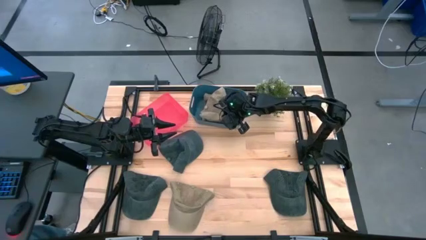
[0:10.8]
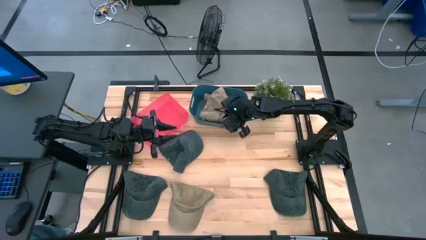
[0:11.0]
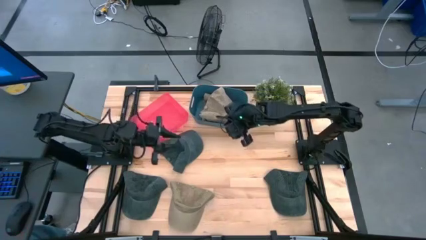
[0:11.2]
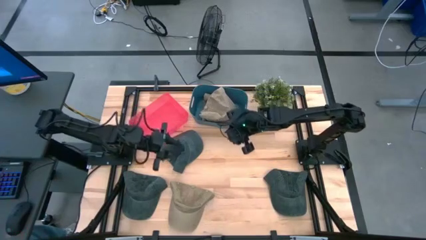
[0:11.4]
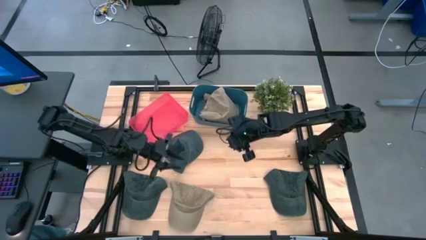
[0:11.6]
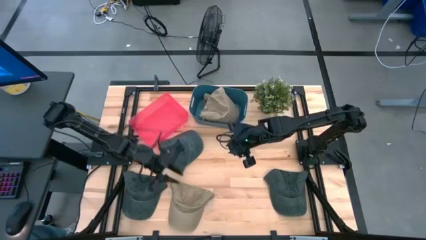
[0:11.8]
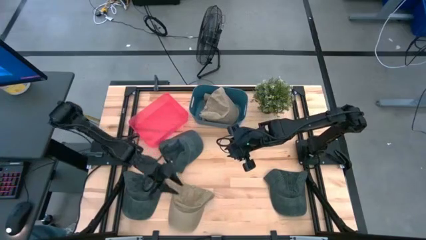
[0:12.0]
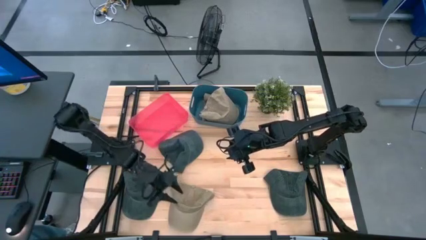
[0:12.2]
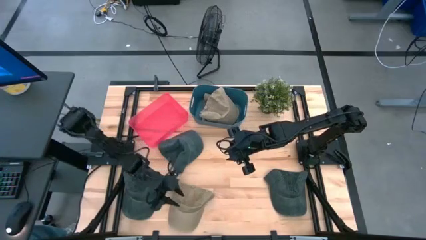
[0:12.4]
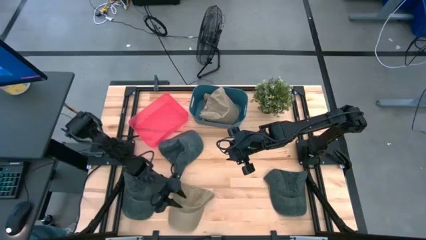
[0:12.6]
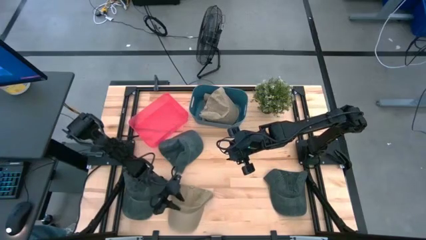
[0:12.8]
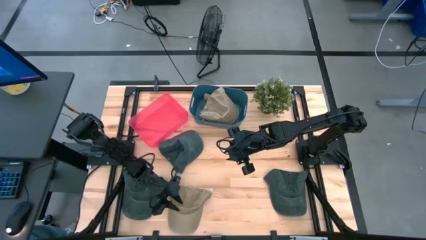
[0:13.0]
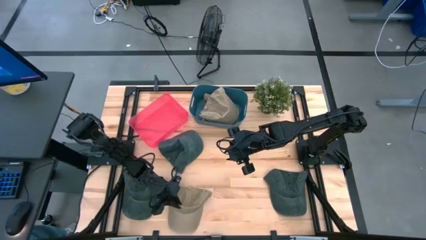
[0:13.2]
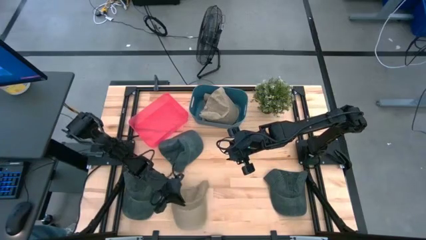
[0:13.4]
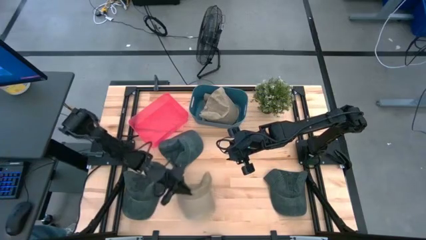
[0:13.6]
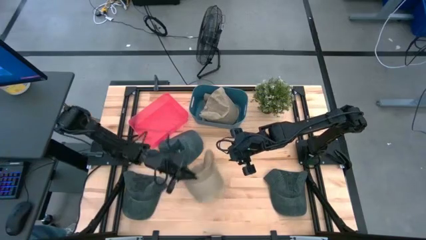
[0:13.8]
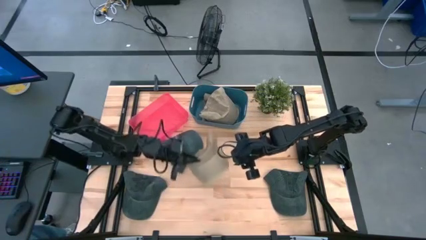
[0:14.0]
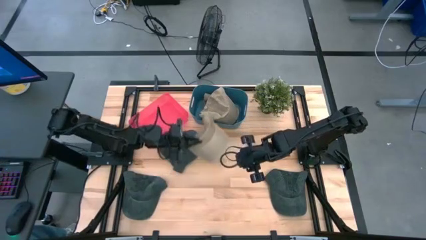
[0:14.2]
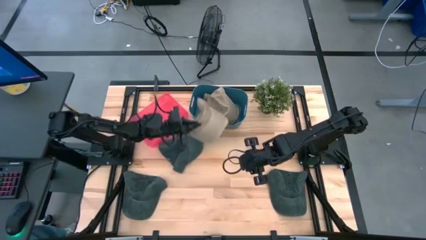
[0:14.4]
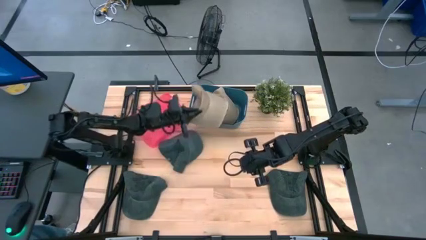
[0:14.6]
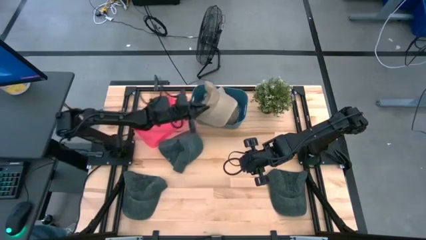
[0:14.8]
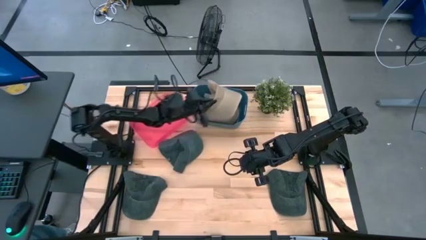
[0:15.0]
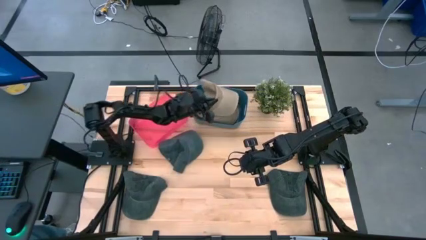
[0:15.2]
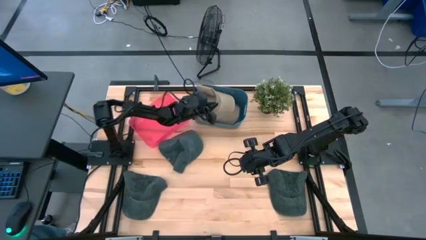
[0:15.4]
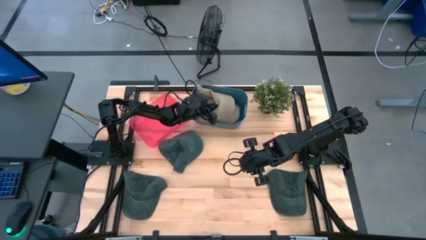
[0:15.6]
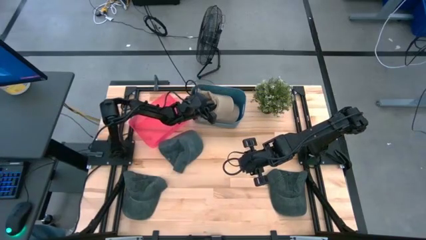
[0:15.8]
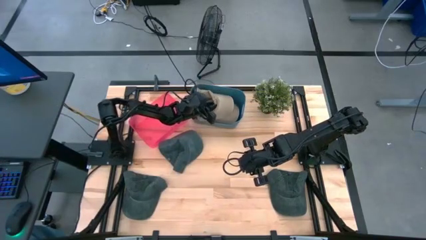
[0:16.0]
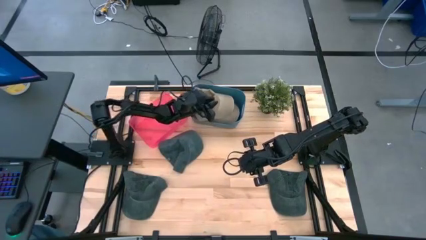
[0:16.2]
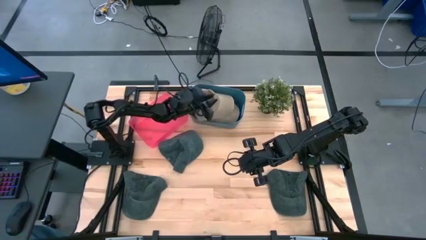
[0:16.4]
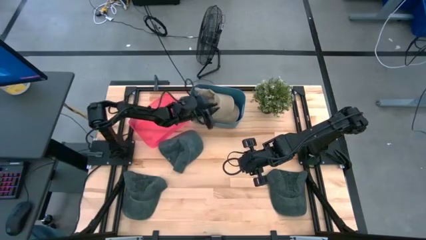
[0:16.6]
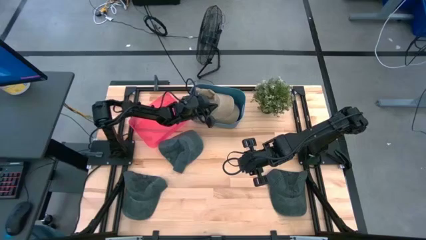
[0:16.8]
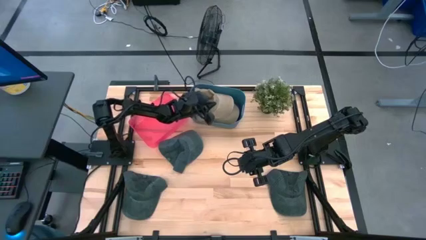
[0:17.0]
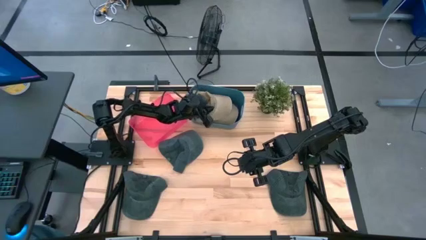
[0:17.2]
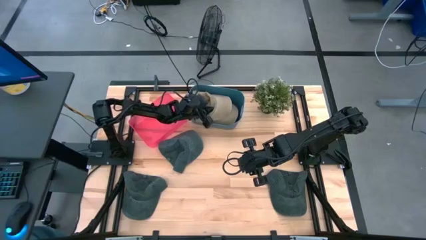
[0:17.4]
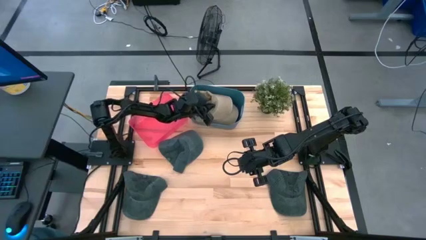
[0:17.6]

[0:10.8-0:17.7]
Task: Pick & Place hat
Put the brown cap into the blue bin

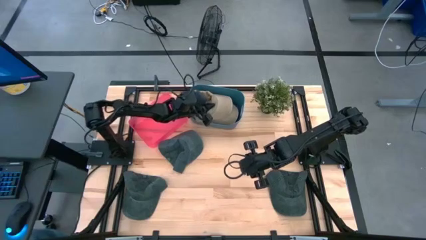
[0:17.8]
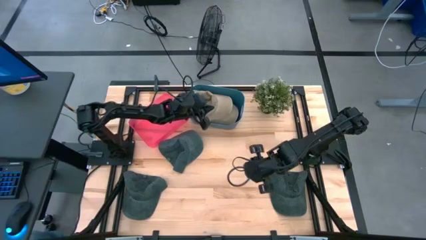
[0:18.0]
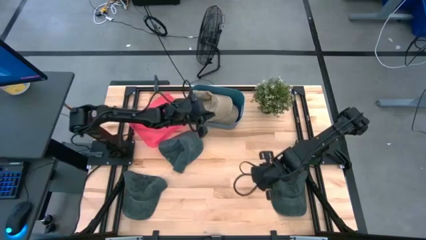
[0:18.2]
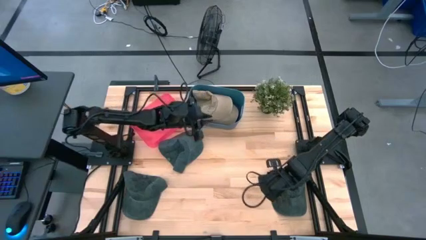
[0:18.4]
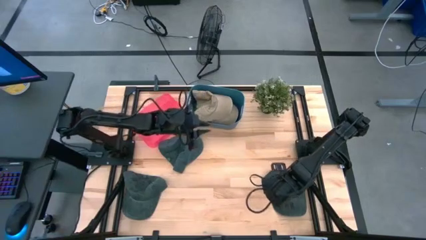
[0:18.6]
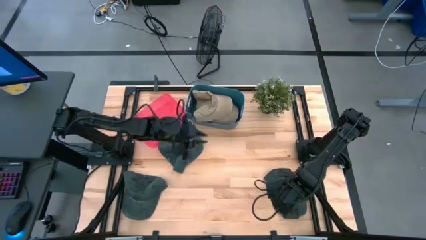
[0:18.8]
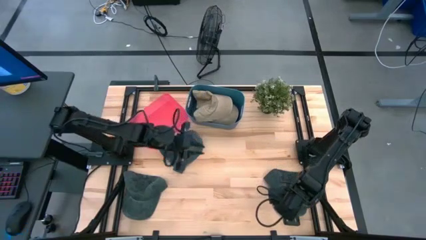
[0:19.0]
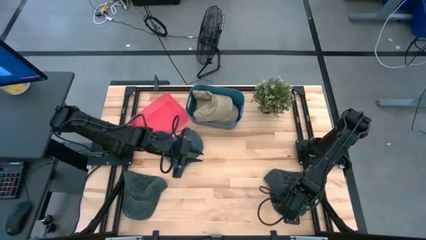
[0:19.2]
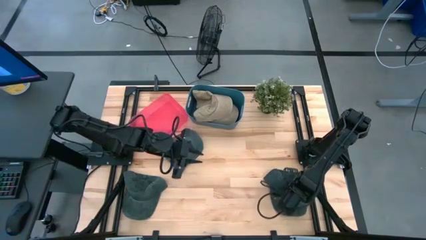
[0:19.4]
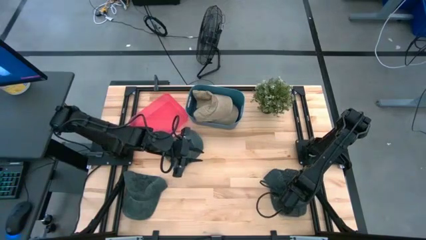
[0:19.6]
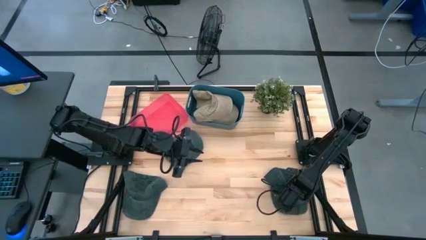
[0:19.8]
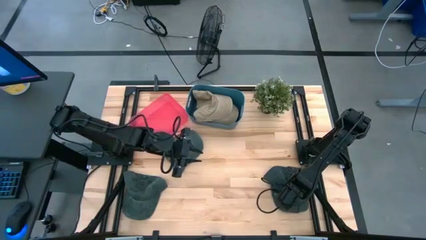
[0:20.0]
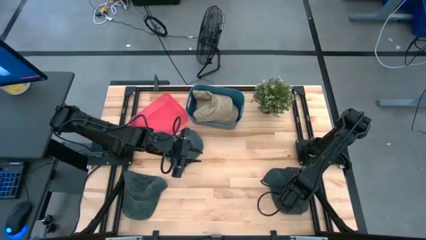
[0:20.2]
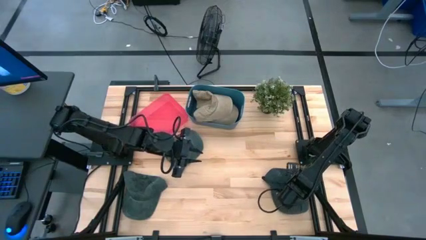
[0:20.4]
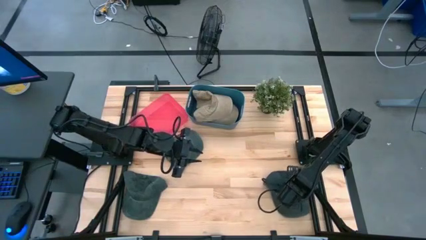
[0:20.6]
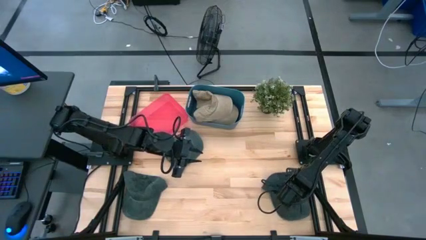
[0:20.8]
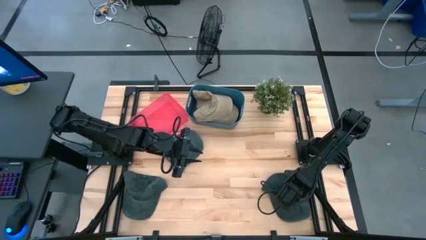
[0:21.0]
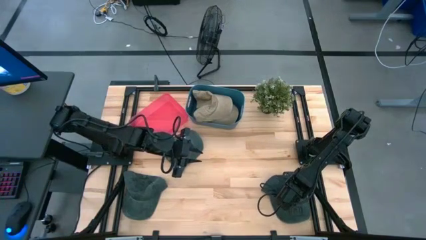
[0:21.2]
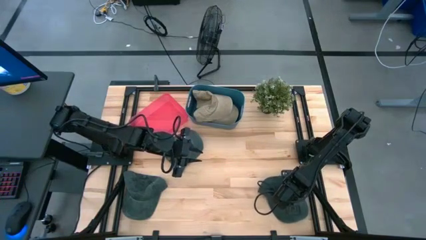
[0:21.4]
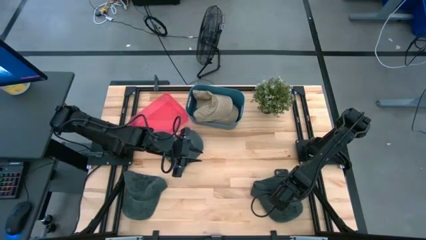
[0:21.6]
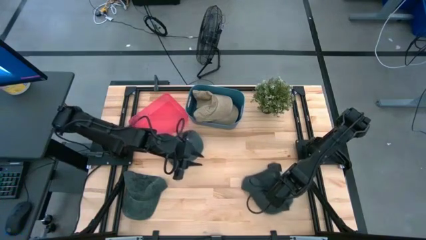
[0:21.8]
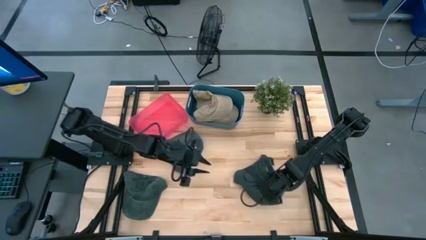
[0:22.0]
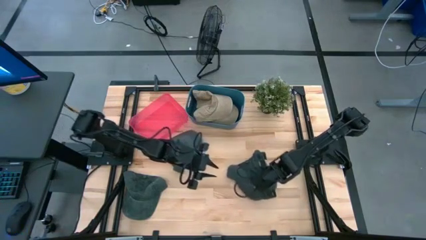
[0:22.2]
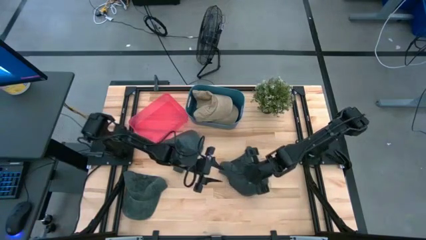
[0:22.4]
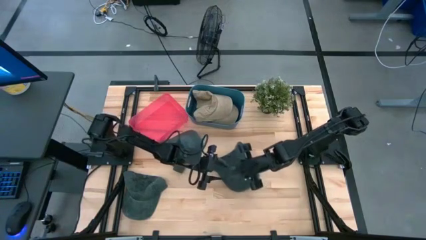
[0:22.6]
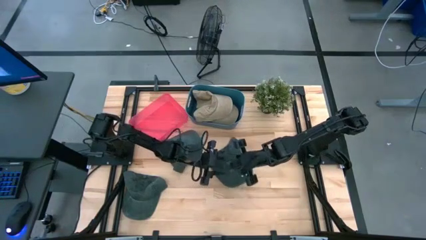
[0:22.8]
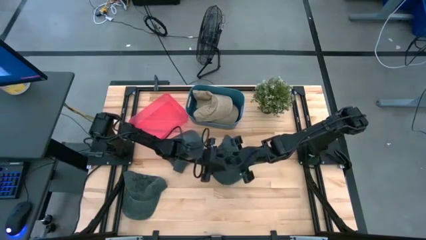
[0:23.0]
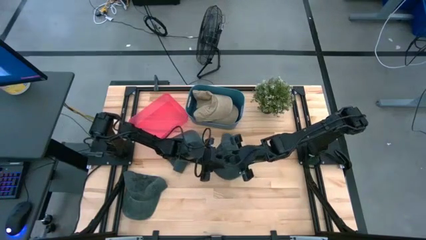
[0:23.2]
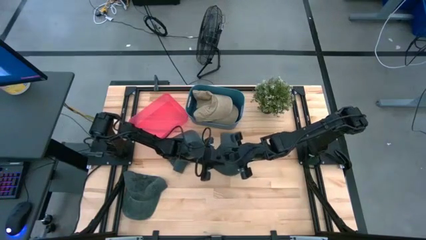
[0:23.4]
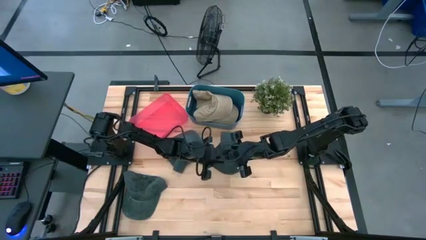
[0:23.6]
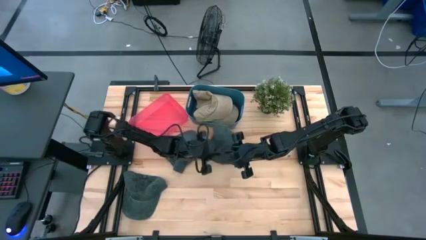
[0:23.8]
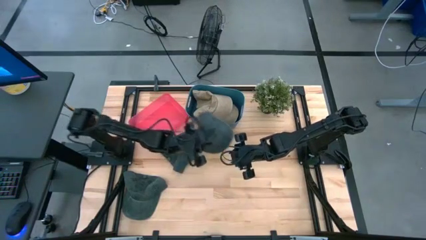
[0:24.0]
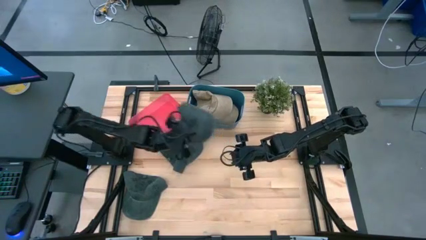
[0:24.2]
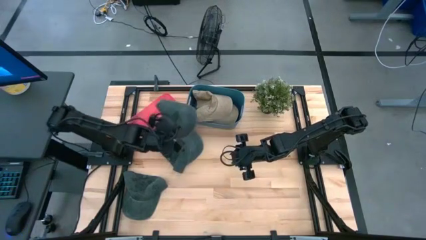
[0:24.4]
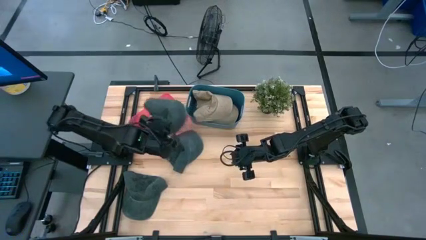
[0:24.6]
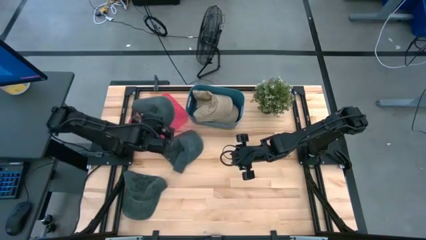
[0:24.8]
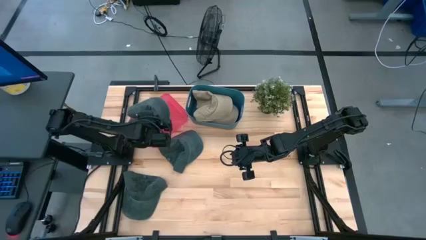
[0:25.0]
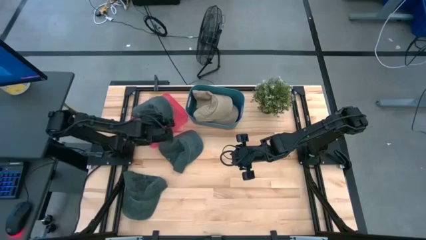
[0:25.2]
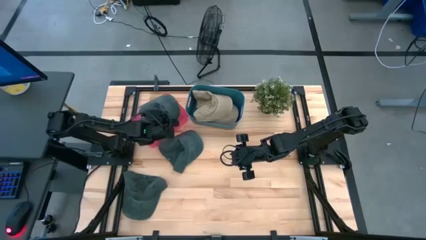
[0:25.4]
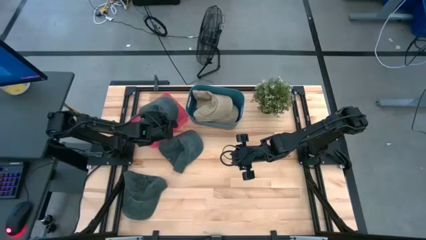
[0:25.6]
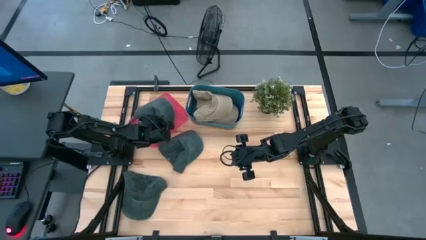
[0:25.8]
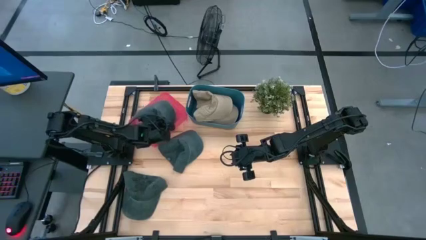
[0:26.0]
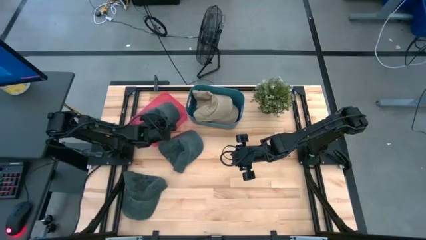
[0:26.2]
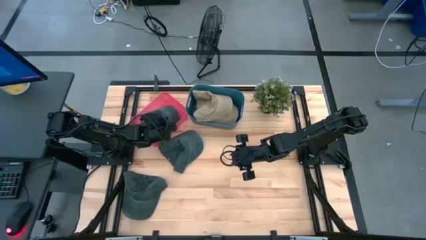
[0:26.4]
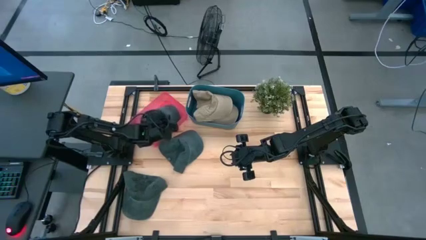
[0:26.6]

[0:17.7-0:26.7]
Put the right black cap into the pink bin
